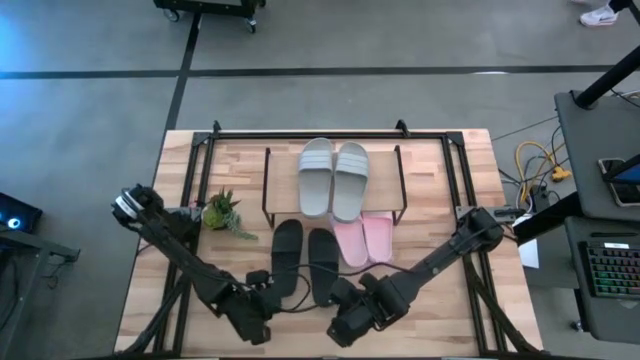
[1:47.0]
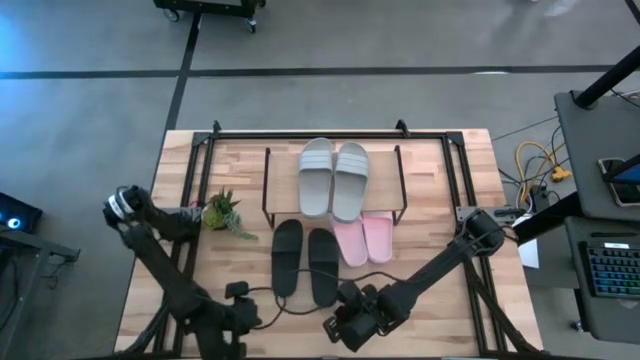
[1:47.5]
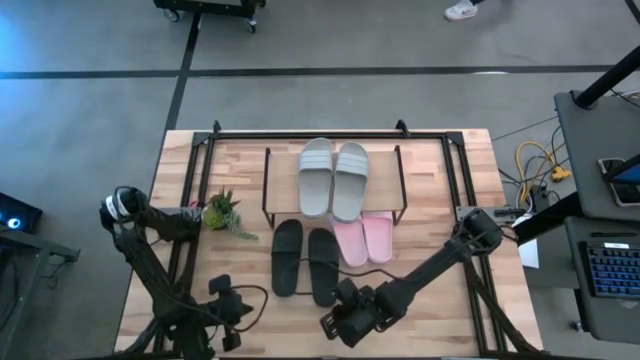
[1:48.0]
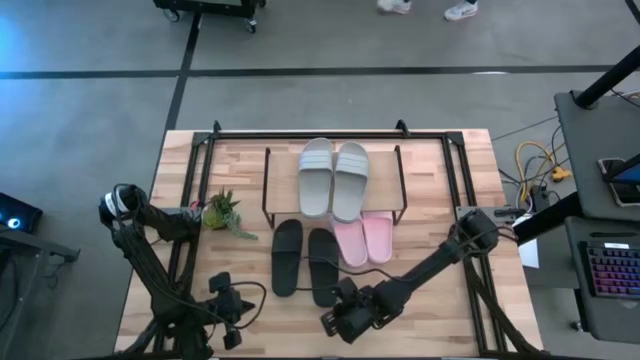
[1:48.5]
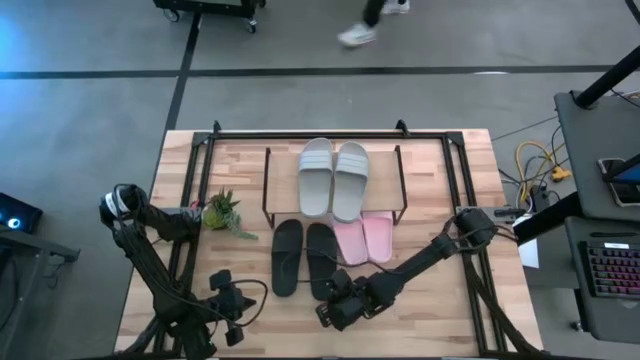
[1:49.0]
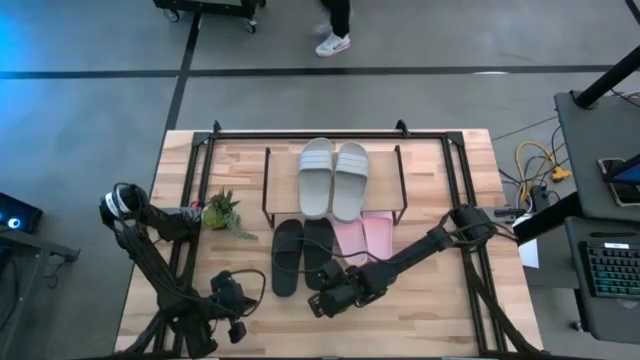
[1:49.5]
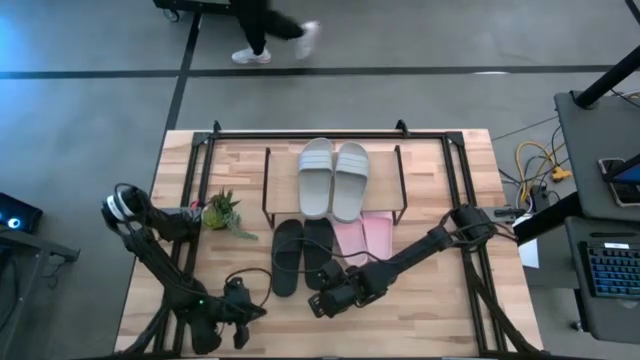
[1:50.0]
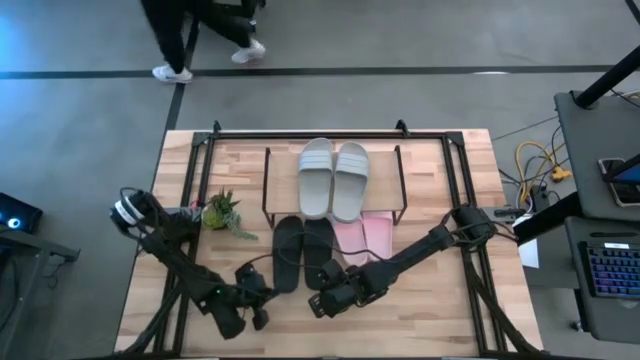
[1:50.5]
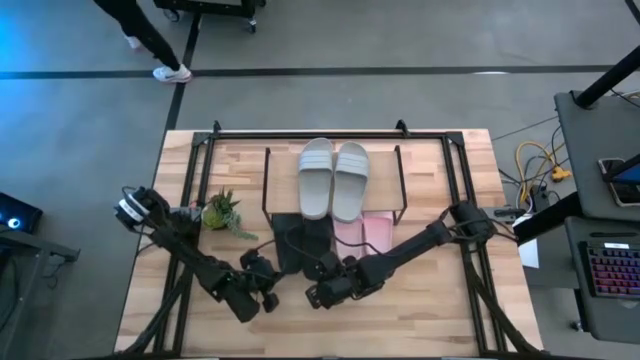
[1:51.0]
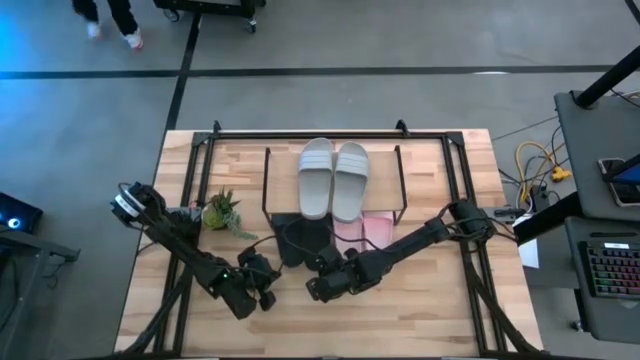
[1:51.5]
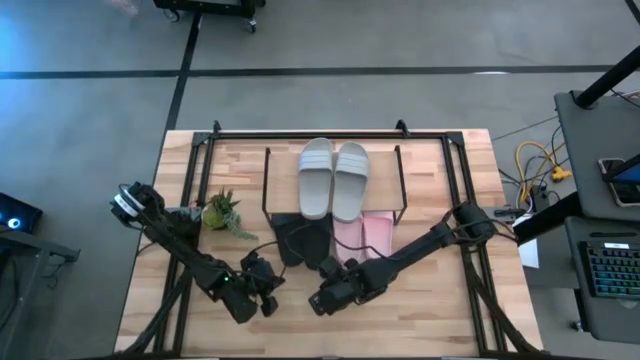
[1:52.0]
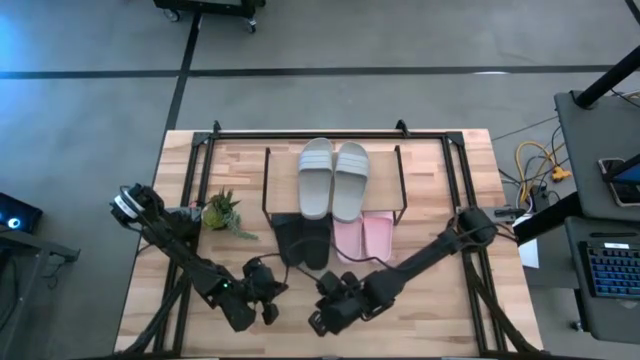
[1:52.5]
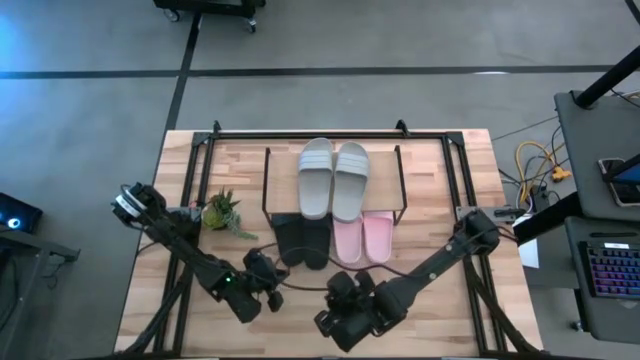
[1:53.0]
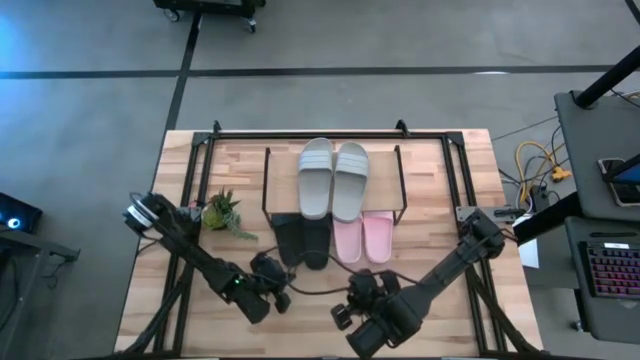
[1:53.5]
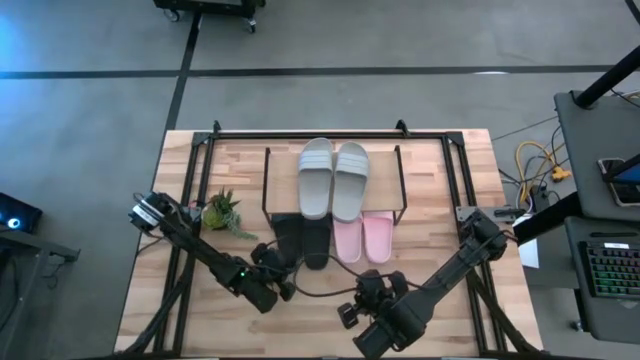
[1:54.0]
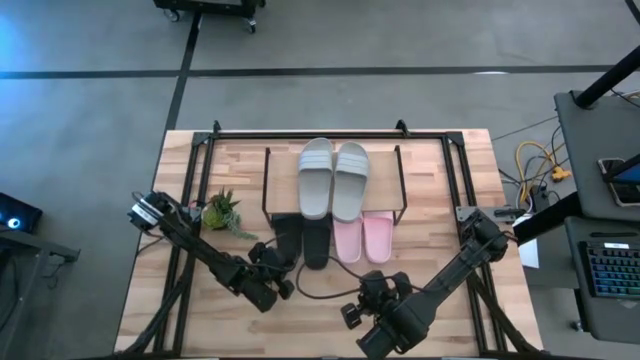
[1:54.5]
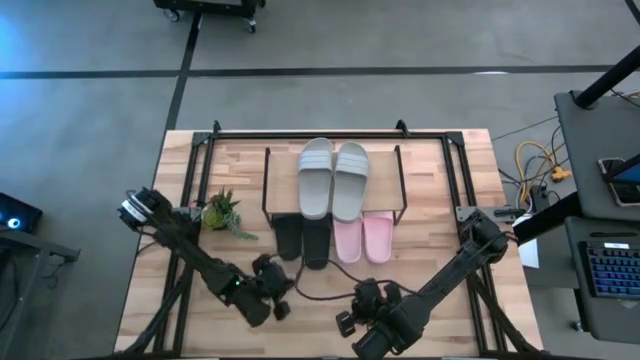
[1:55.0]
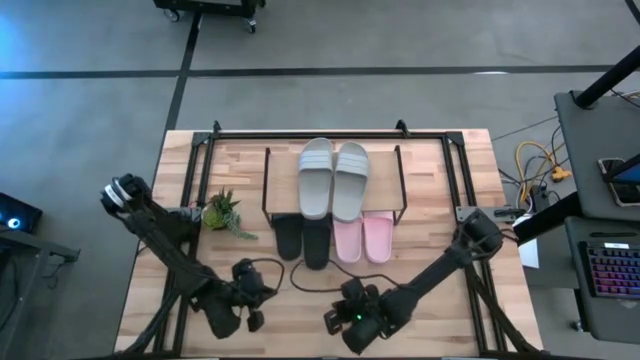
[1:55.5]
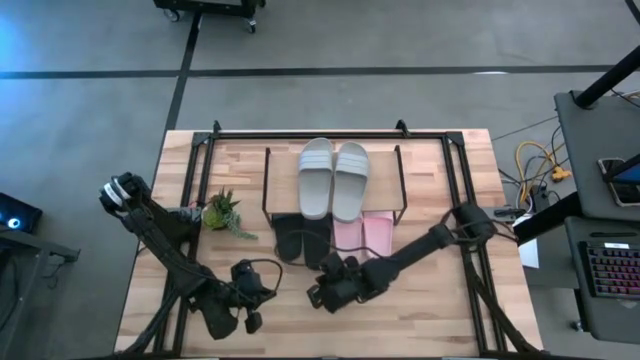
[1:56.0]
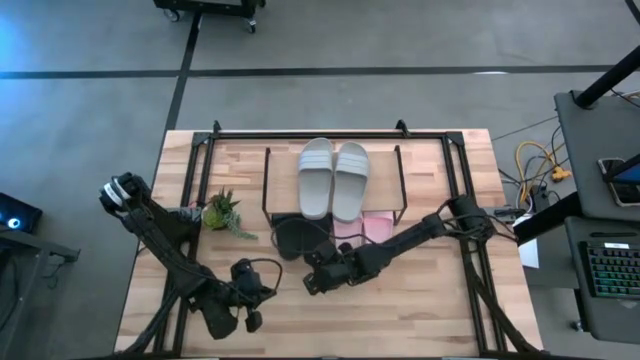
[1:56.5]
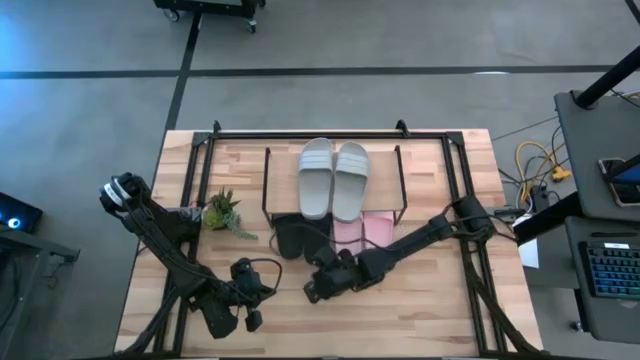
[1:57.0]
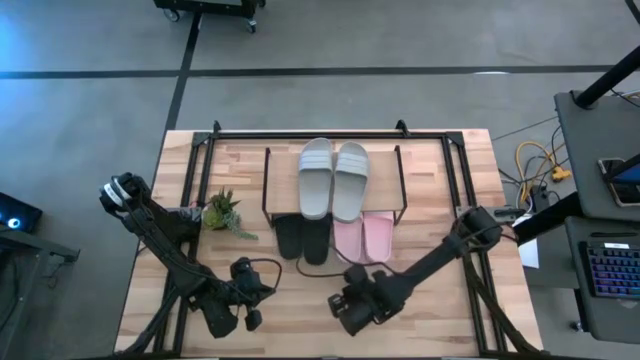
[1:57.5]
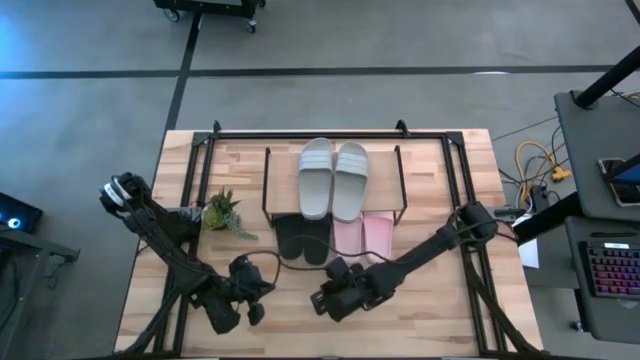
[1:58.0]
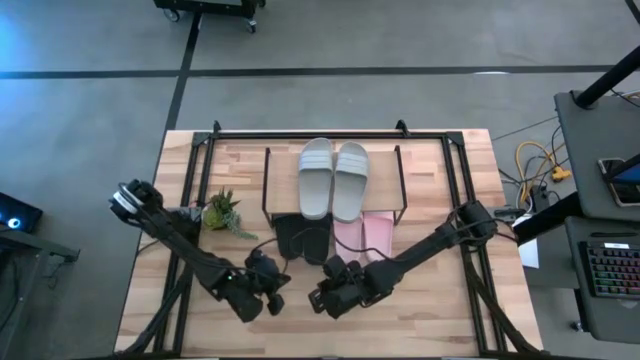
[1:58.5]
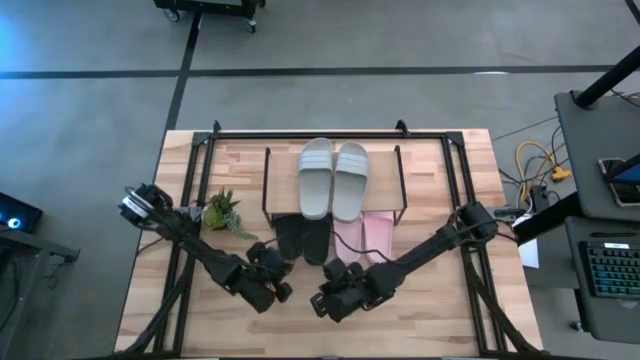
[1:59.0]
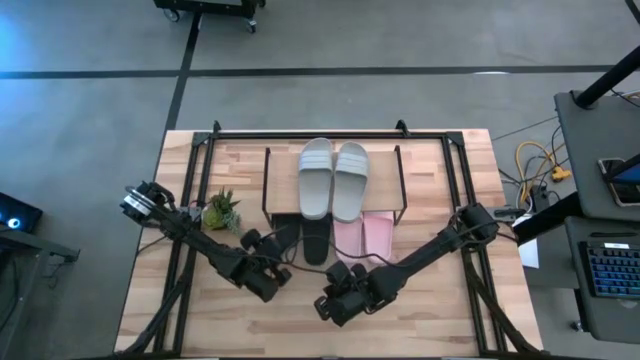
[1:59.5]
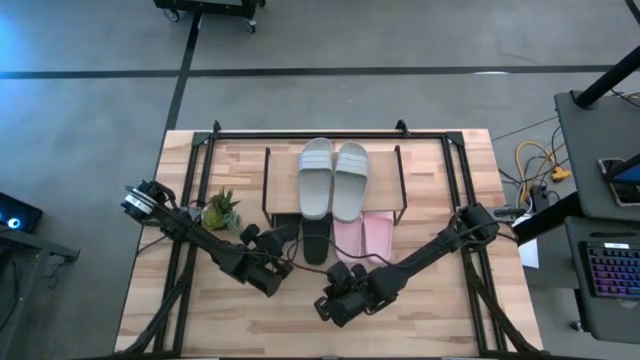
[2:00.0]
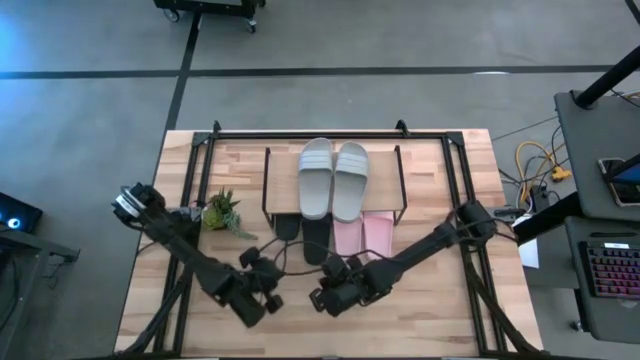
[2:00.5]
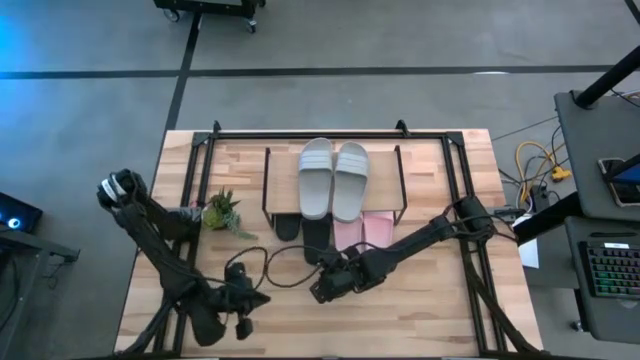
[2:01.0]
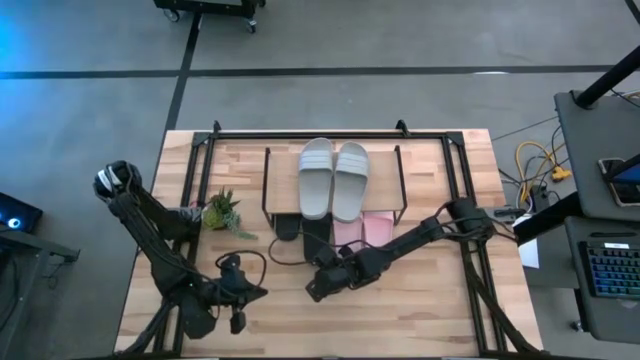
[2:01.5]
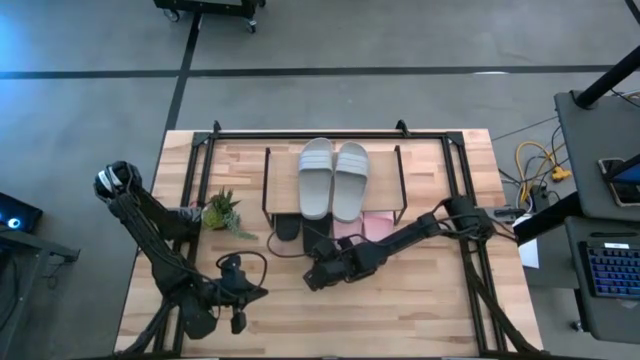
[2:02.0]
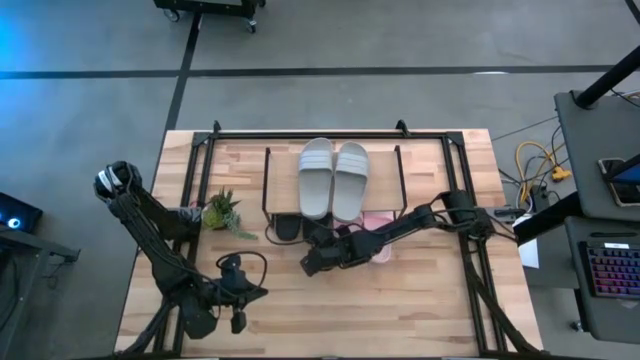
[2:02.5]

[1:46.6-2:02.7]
Task: Pick and place slides into the shelf
Move the black slides under the shelf

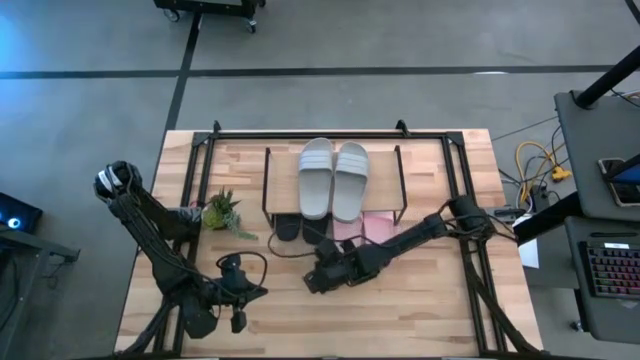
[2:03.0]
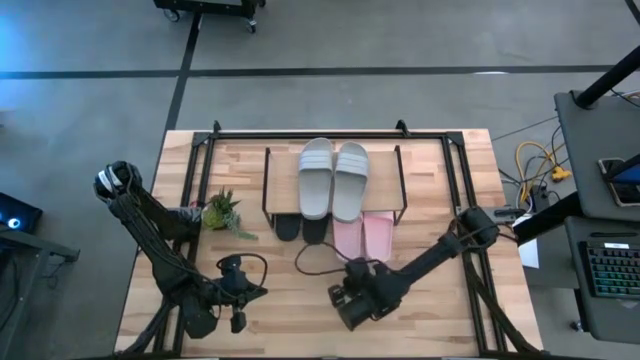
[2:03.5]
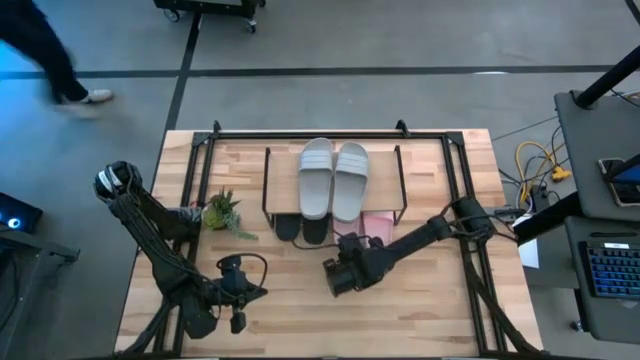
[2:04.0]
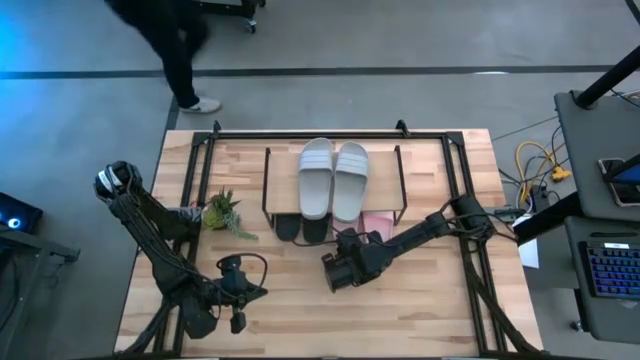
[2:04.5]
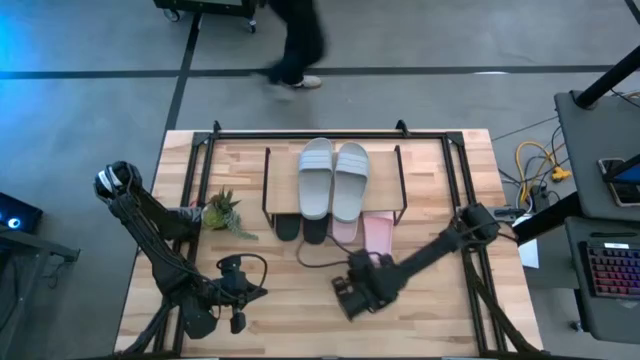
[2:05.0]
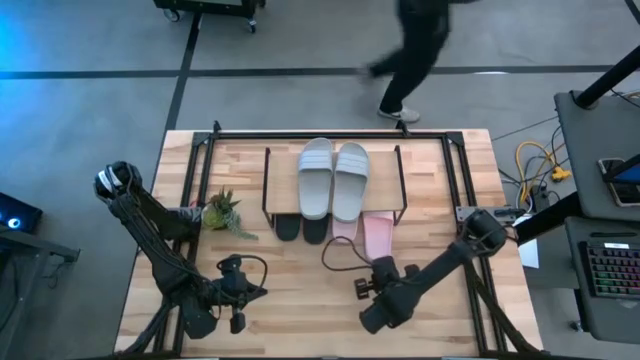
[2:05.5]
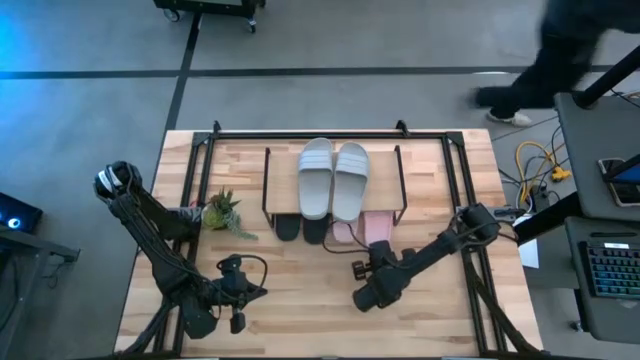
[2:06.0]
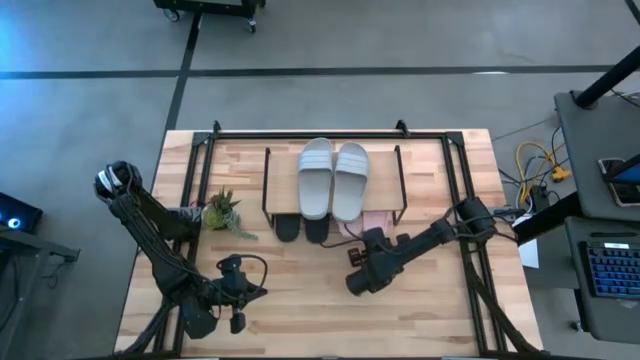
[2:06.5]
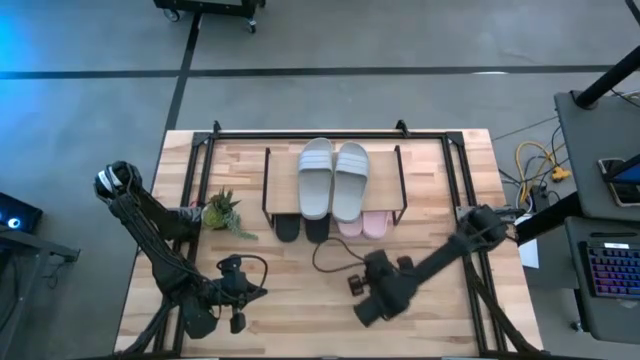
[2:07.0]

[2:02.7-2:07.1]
Adjust the pink slides under the shelf
